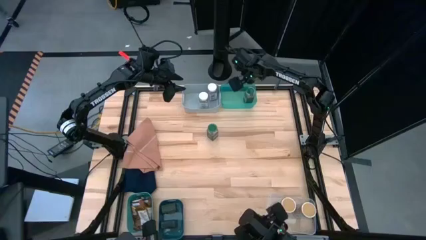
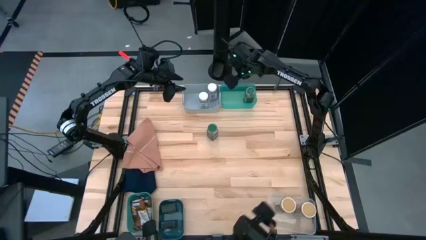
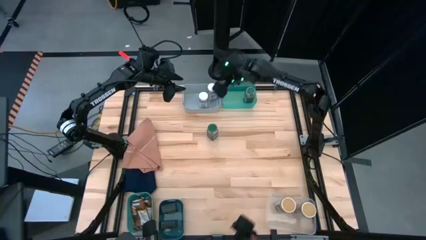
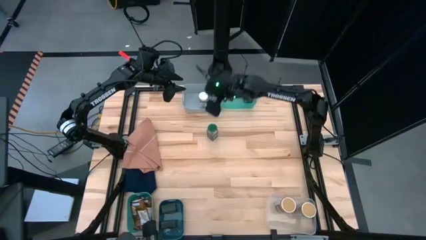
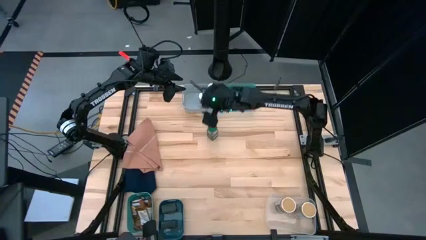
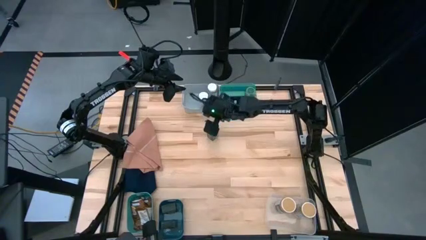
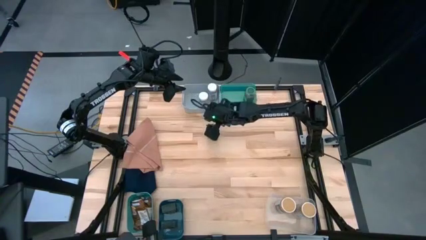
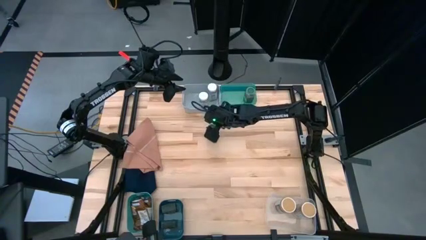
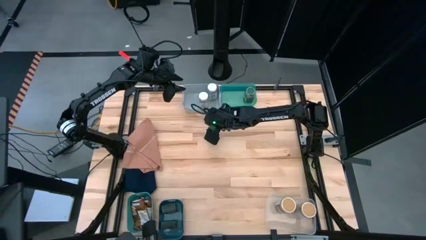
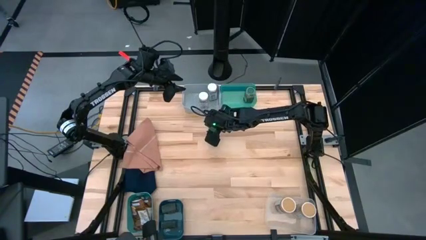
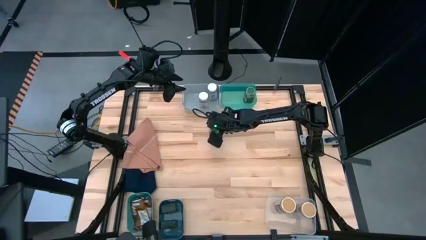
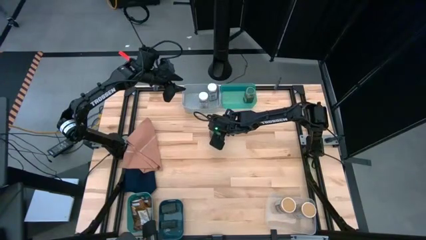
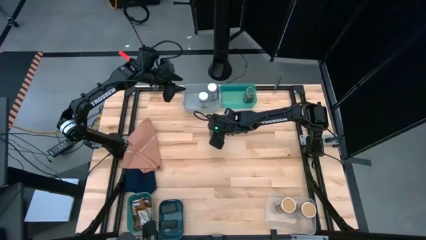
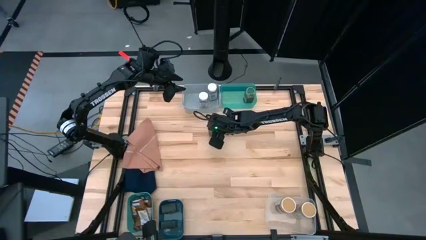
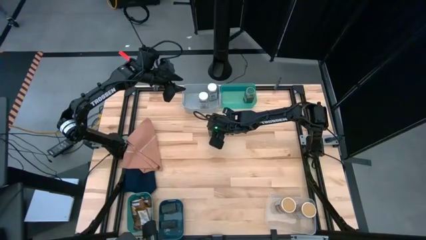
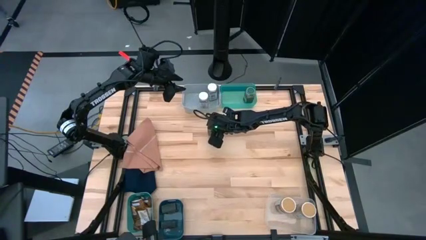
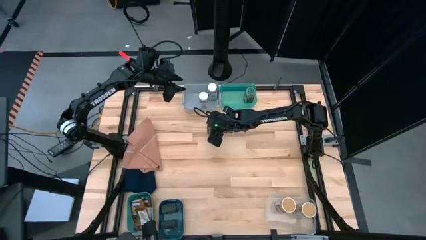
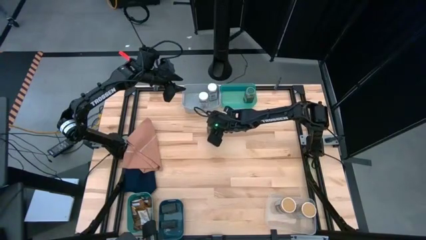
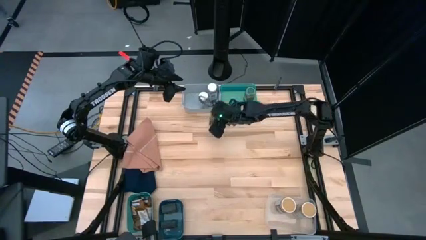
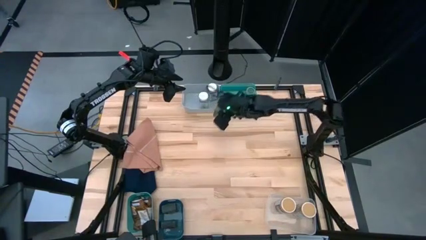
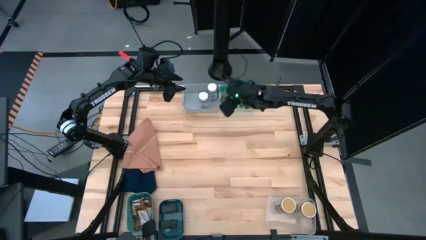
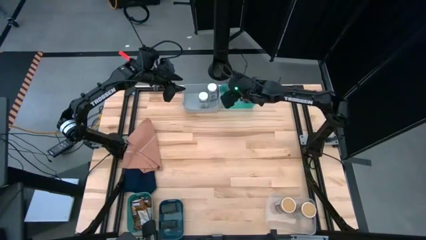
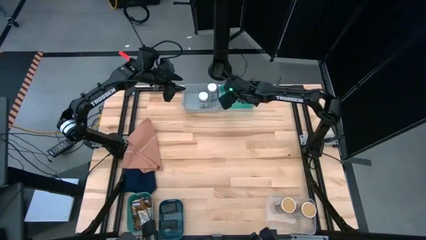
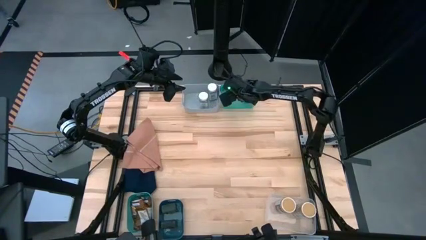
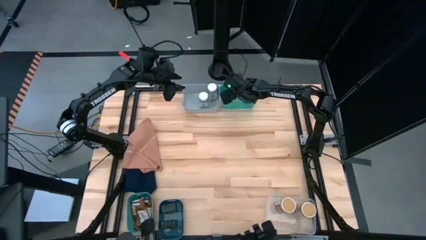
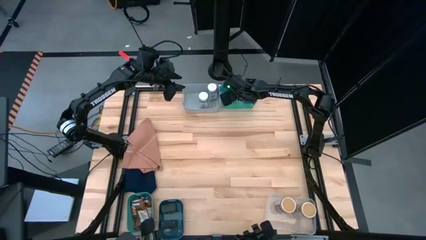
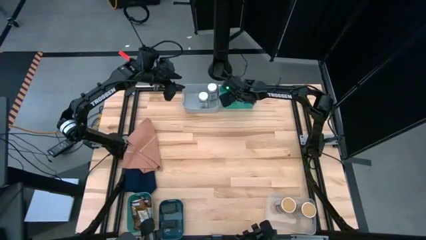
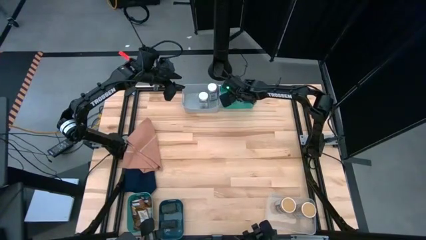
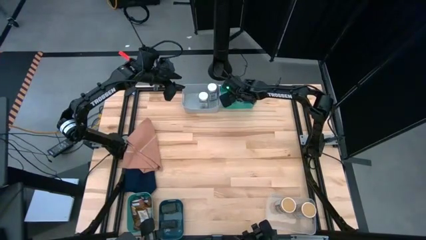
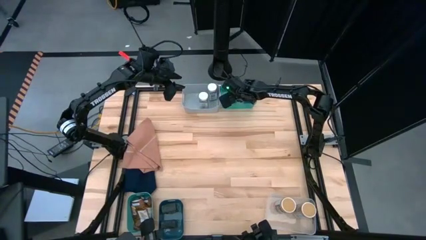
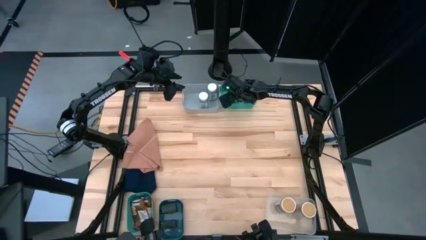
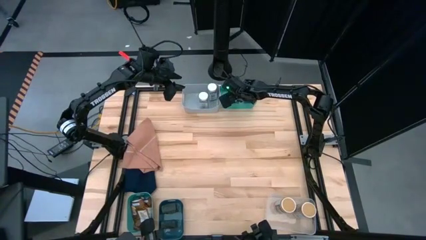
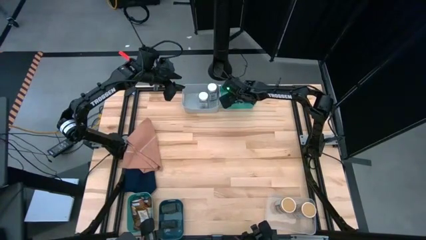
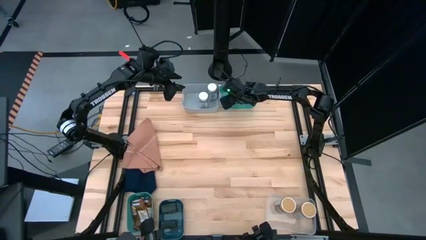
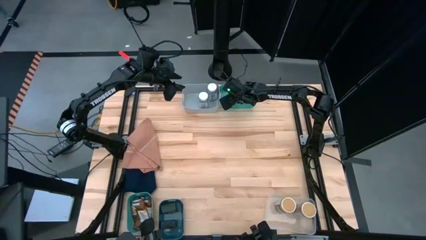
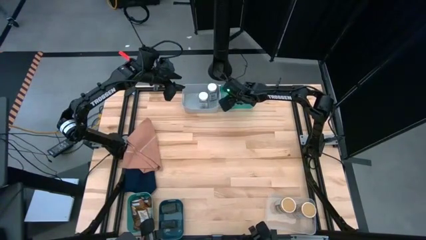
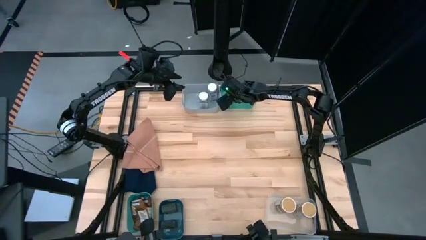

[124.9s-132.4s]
Task: Sort spices by type
Put the green spice bottle into the blue bin

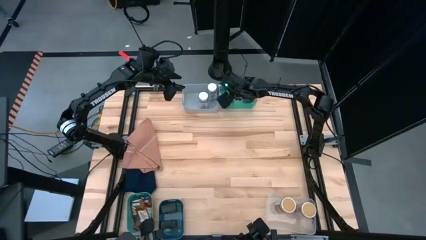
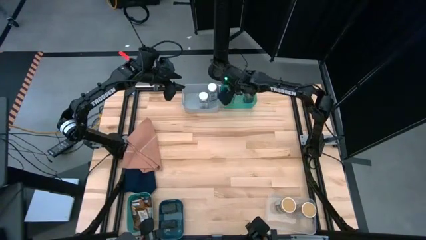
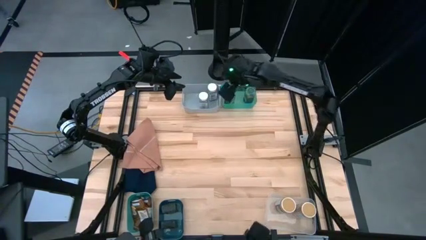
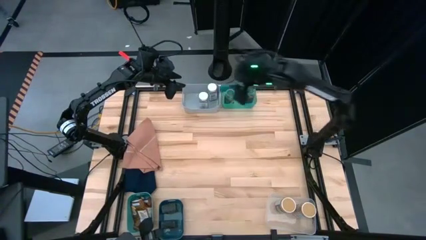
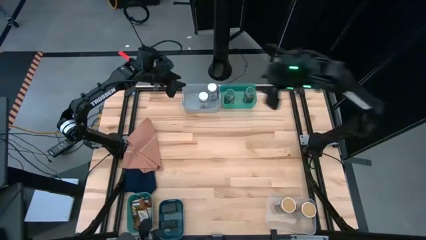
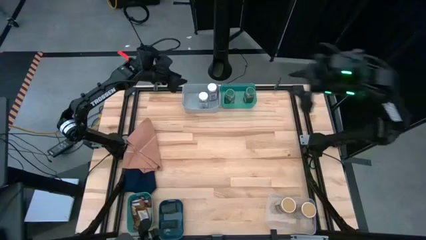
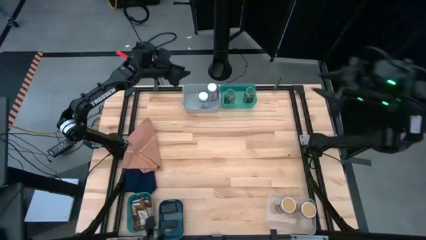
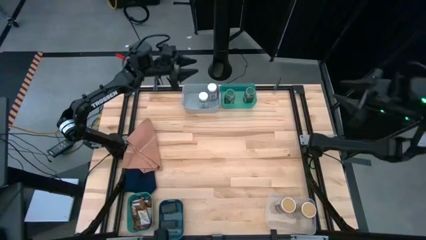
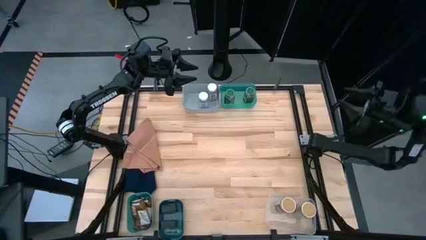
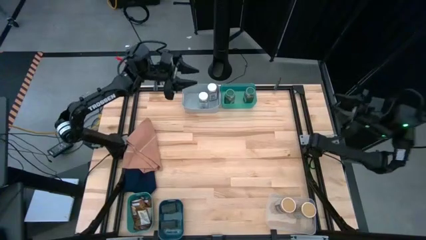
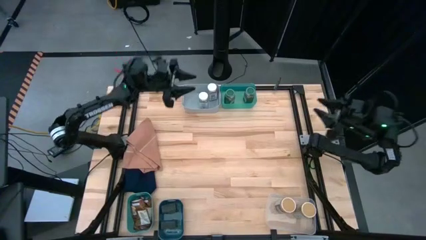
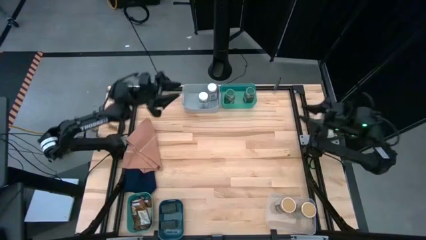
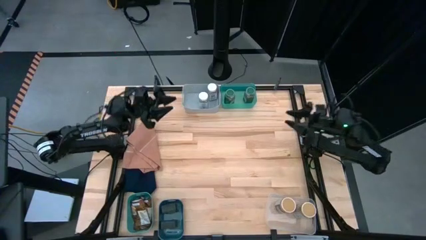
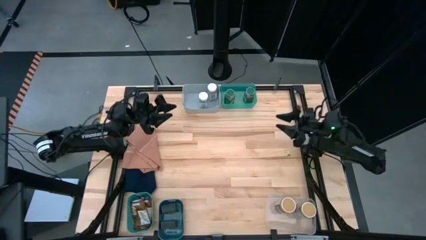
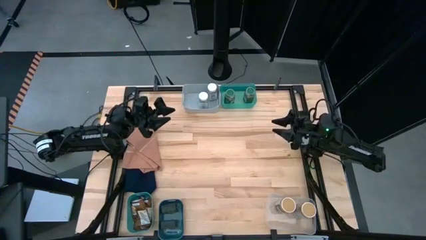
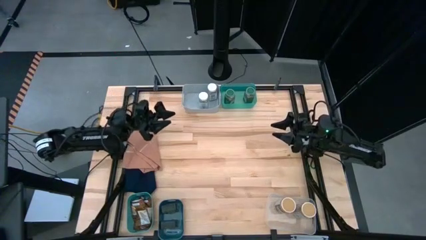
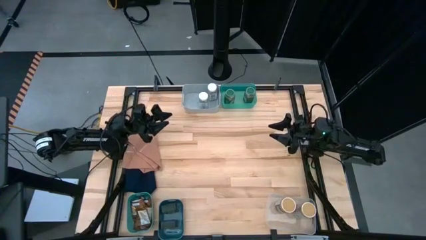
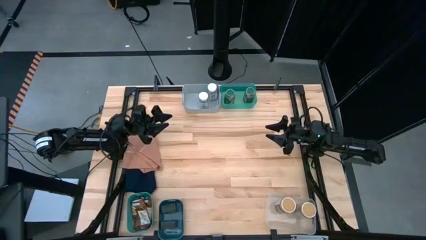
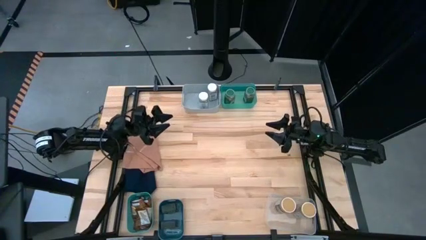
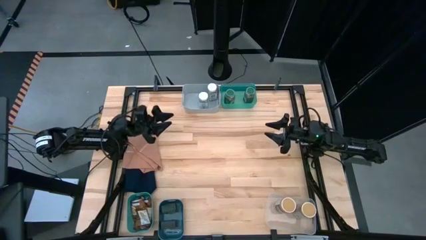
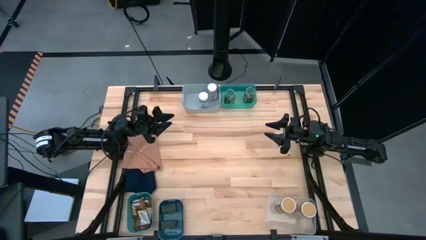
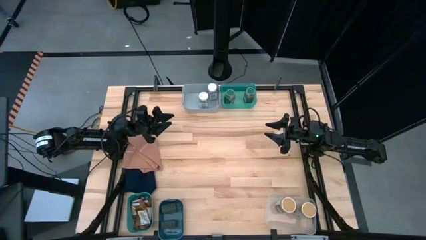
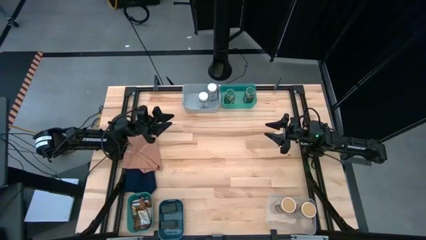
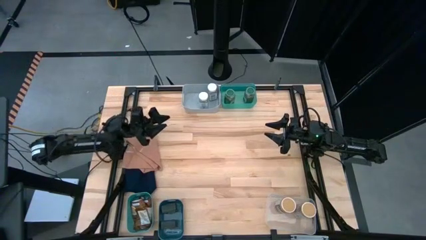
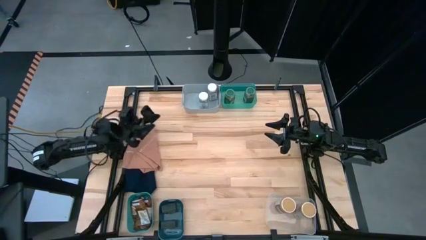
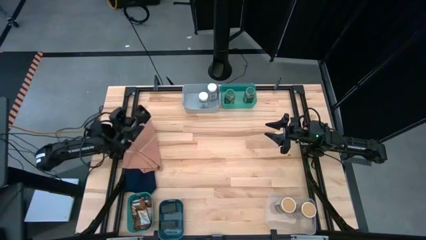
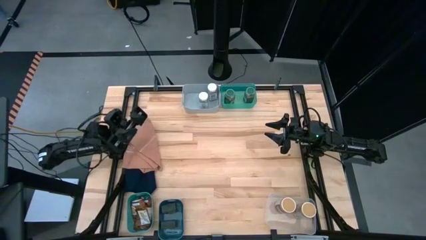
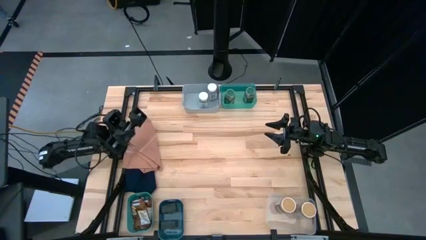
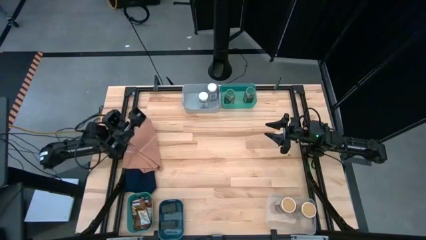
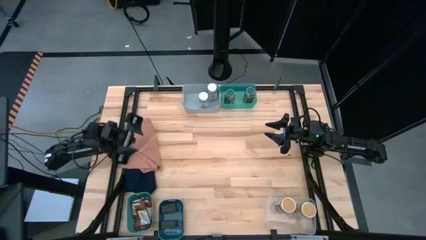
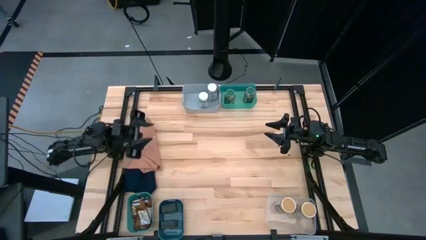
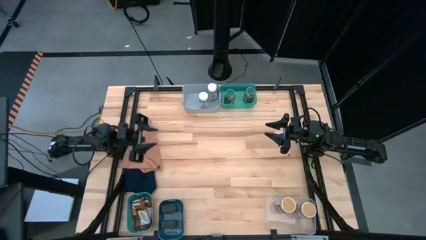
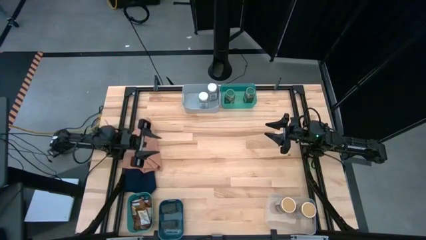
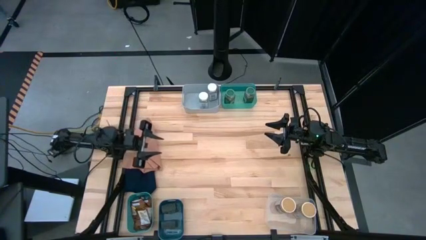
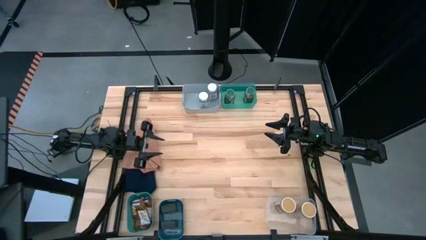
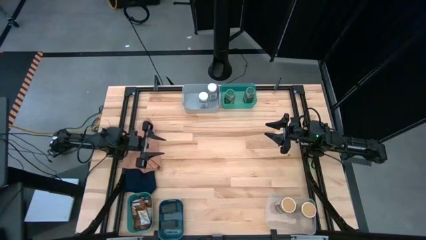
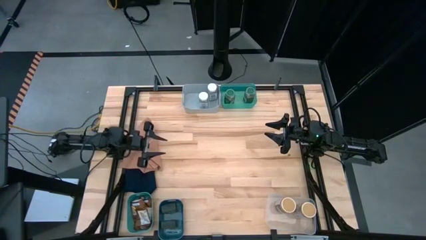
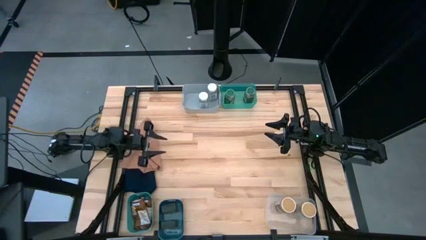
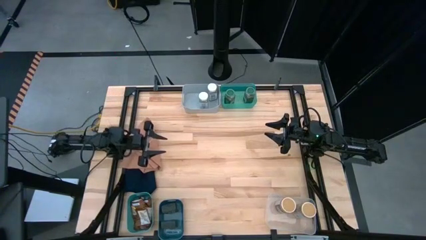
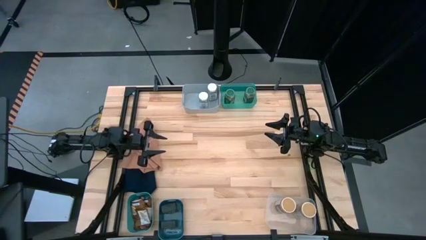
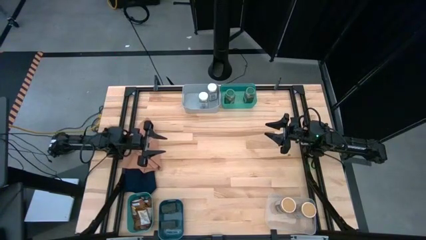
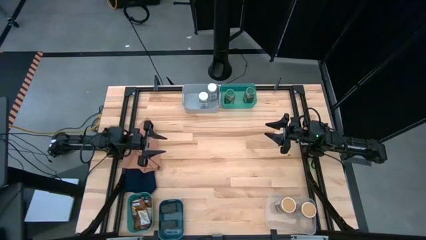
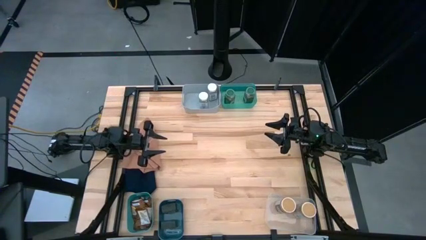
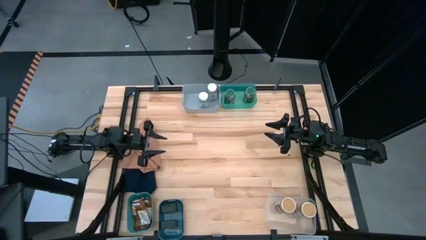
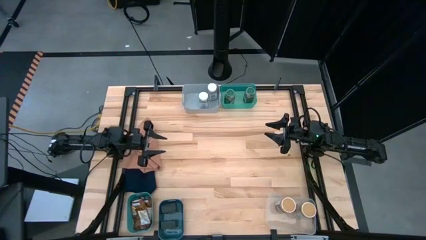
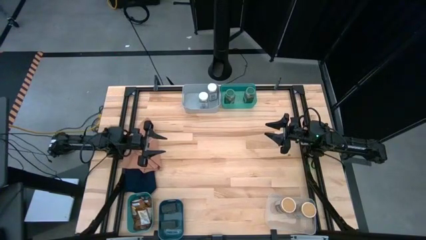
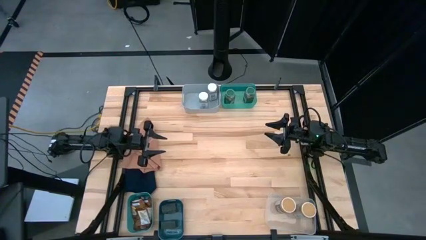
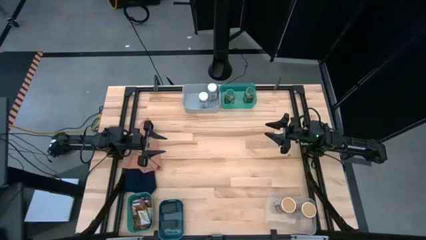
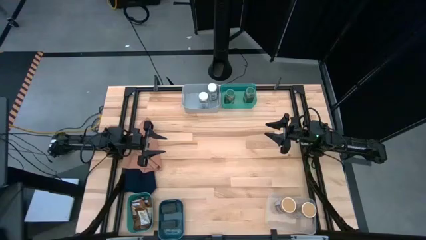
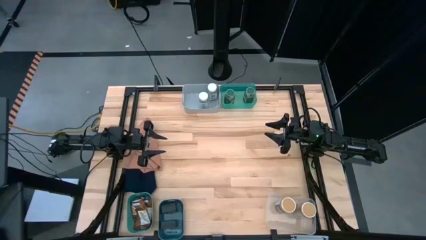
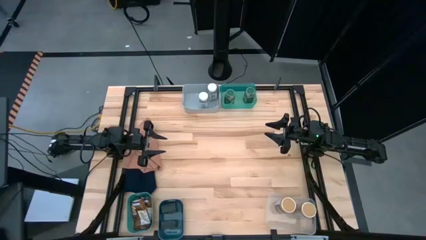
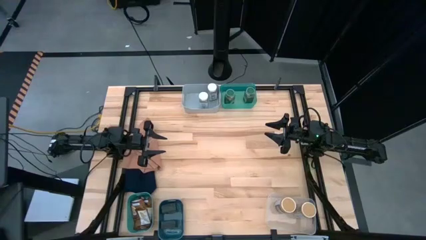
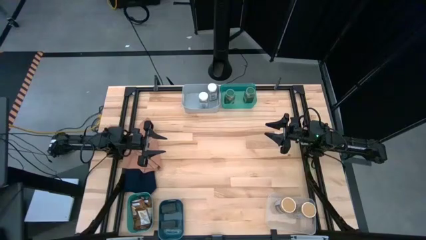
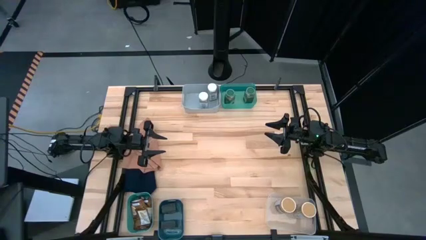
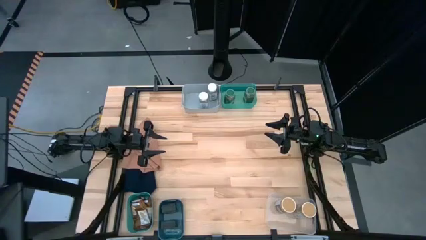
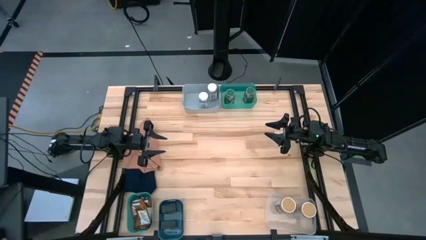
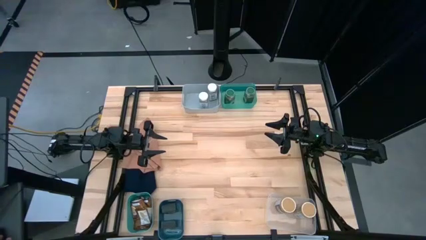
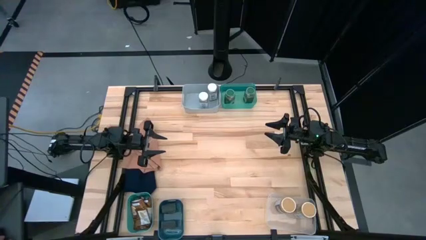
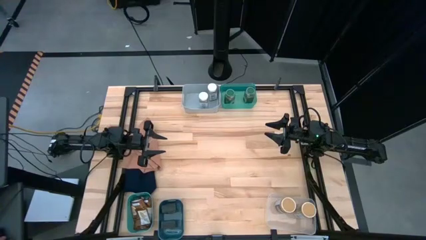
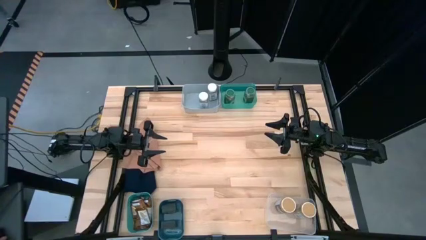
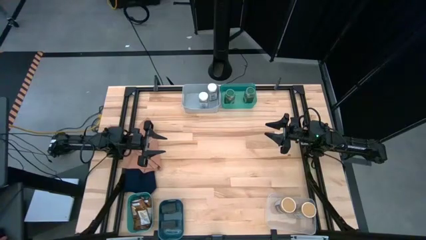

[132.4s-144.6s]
Return to Home Position
